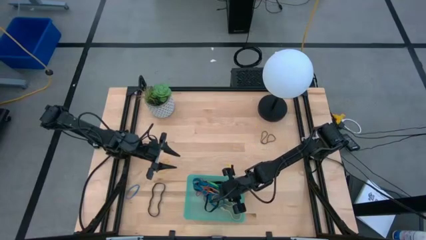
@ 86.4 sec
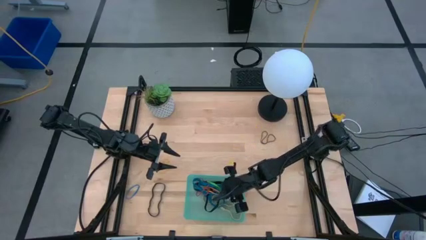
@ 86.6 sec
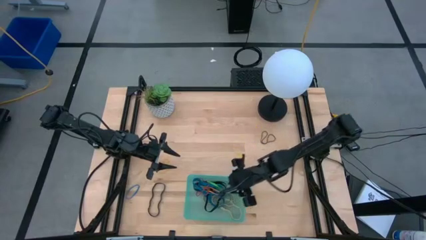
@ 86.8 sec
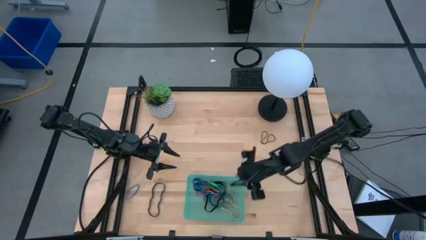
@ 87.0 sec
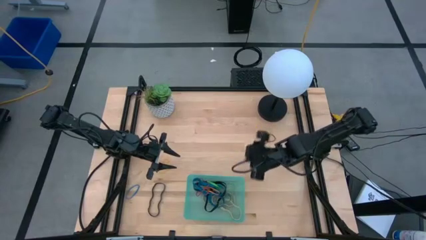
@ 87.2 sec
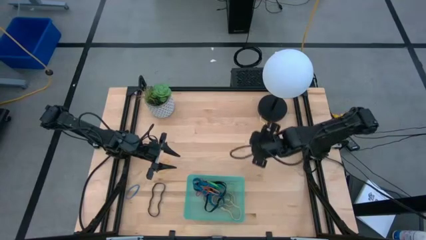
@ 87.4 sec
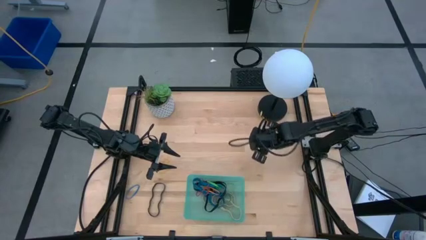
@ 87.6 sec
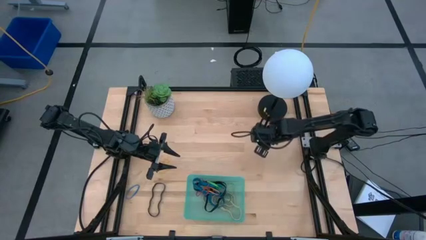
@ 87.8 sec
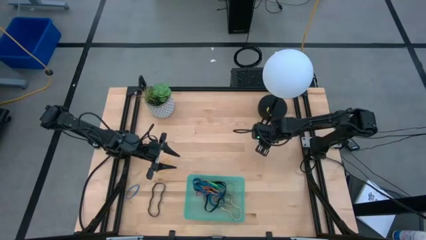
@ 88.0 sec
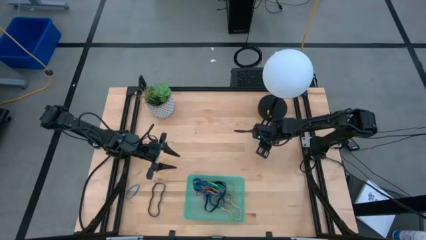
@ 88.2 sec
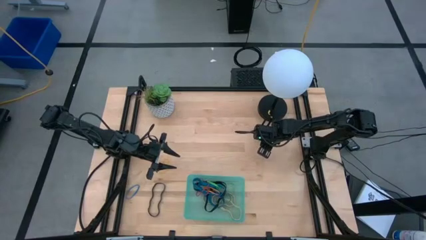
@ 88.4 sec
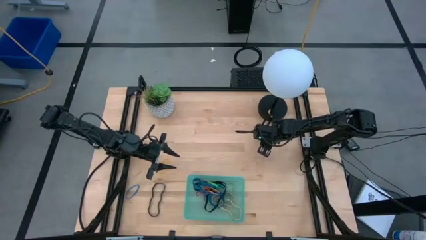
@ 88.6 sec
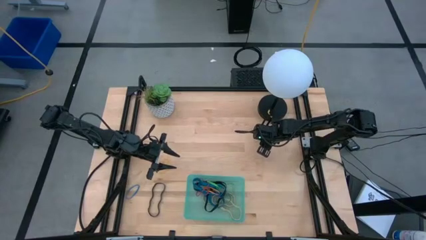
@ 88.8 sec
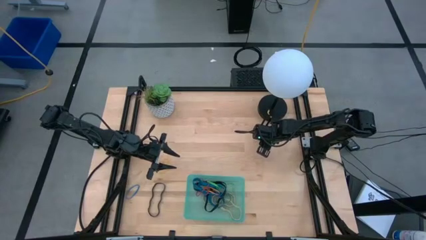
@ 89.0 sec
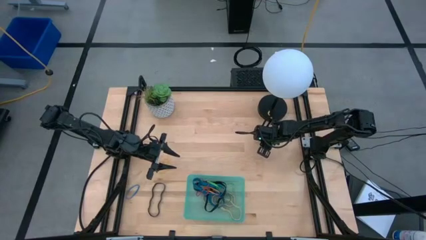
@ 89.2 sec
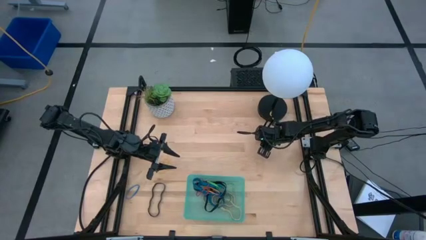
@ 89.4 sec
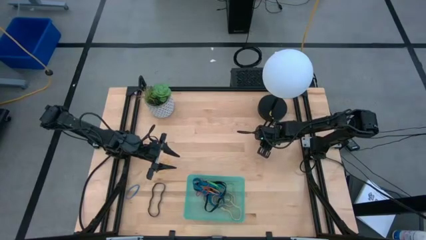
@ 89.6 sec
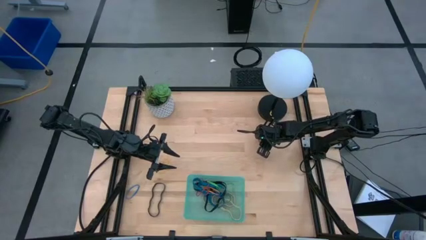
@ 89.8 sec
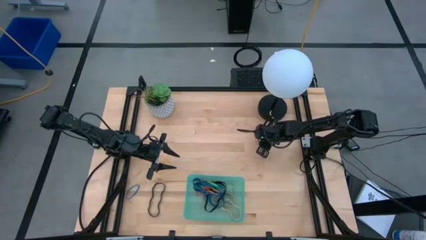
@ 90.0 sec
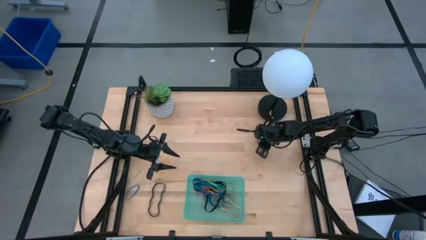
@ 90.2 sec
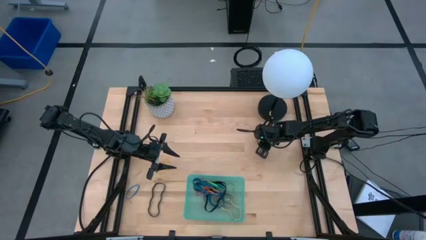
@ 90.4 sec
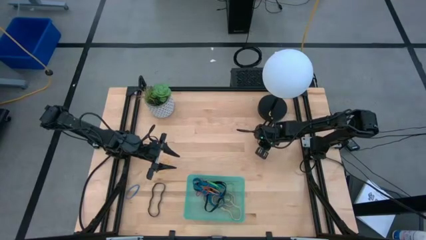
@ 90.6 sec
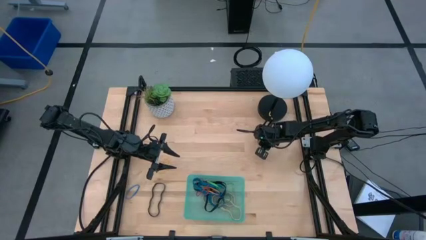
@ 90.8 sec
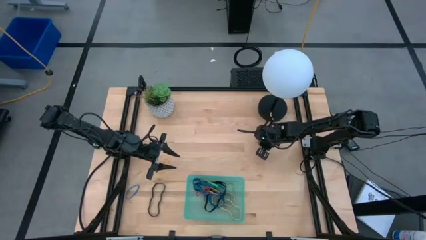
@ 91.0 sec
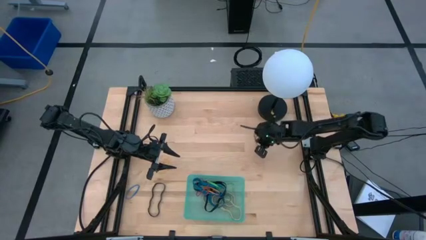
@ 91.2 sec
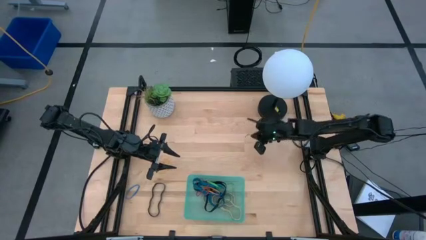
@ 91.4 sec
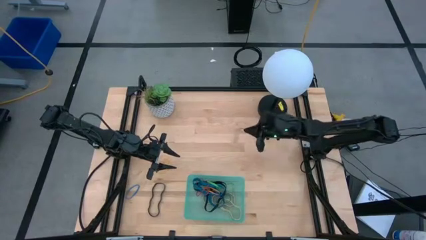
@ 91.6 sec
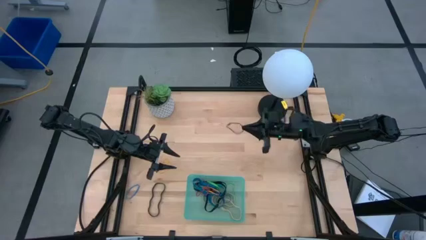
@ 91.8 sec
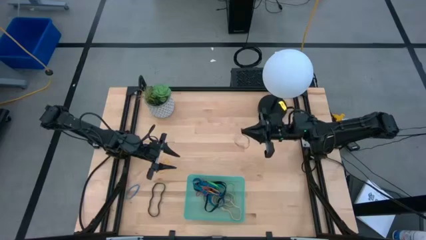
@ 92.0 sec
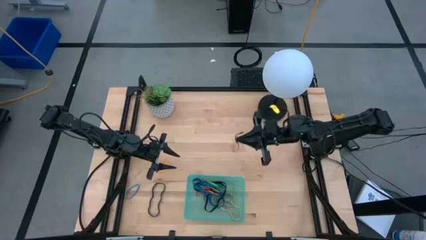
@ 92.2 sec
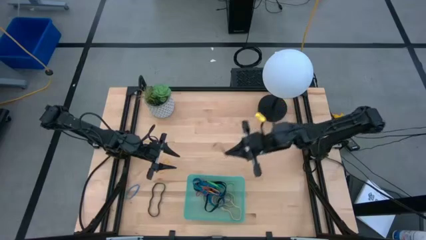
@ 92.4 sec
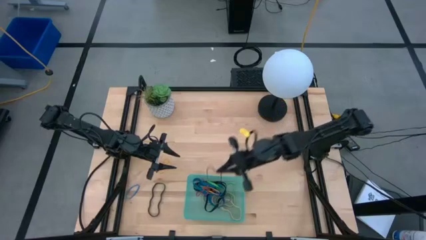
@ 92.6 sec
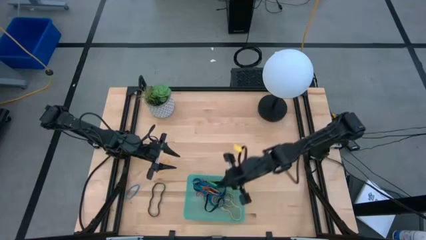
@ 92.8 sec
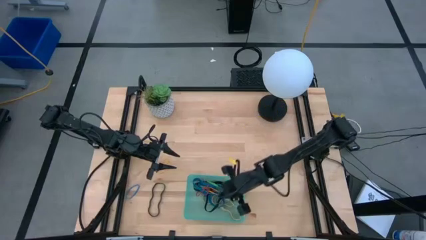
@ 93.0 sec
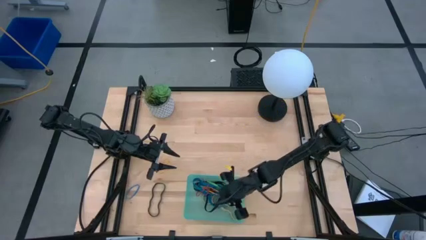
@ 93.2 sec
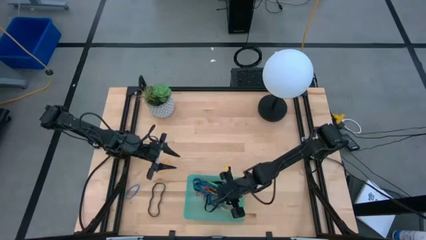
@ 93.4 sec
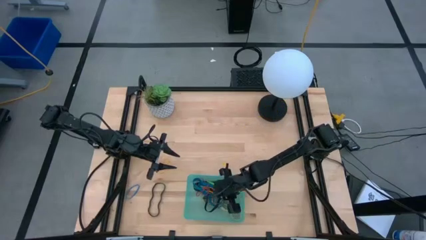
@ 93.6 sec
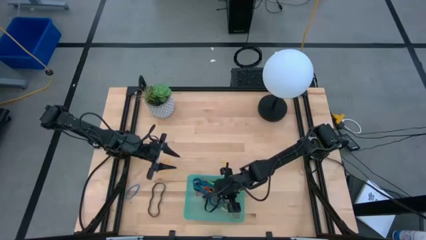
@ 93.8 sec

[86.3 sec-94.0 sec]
Task: Pick and place rubber bands into bin
Put the small violet rubberband into the green bin

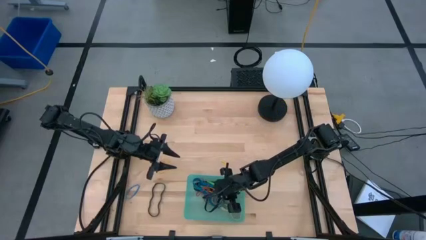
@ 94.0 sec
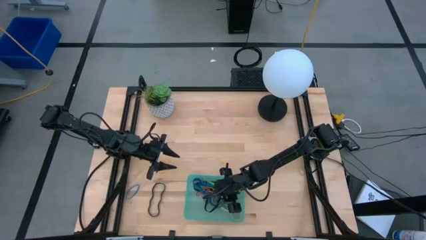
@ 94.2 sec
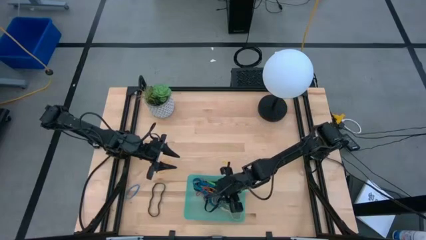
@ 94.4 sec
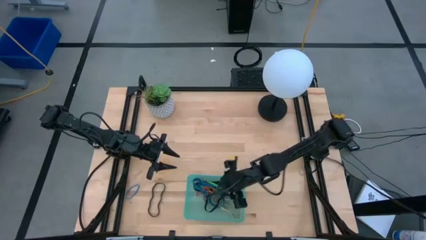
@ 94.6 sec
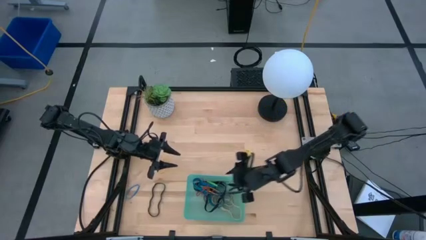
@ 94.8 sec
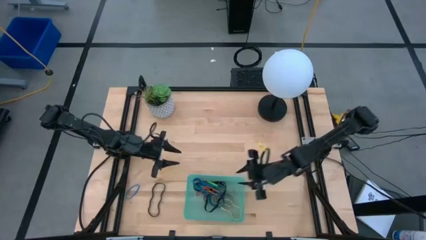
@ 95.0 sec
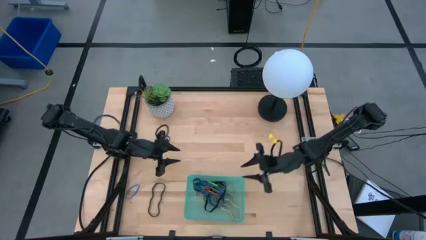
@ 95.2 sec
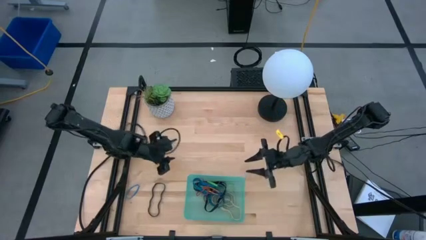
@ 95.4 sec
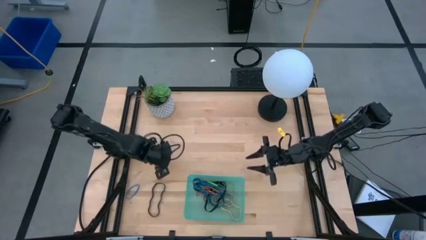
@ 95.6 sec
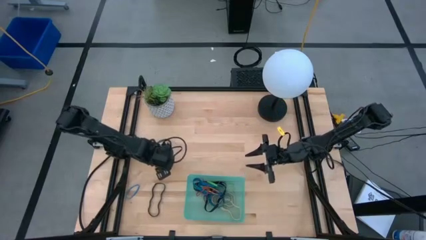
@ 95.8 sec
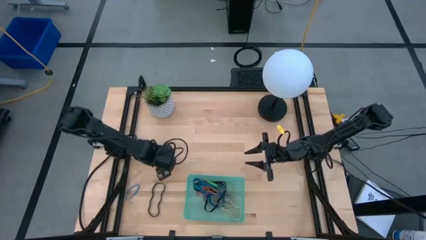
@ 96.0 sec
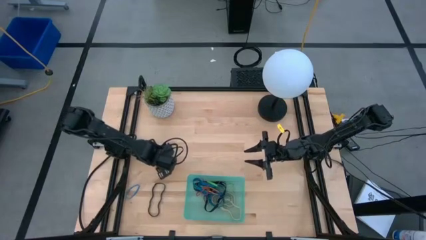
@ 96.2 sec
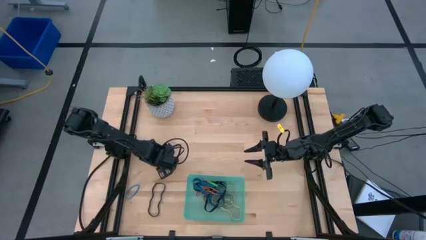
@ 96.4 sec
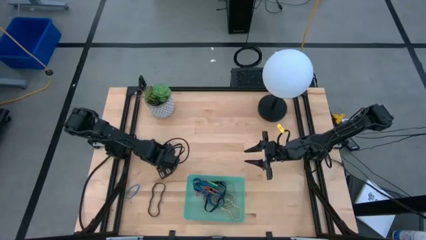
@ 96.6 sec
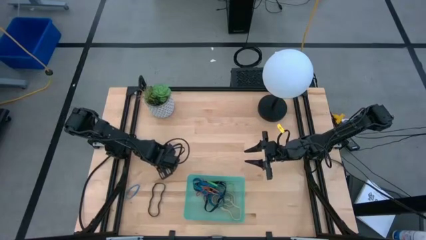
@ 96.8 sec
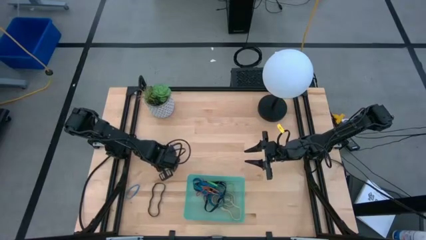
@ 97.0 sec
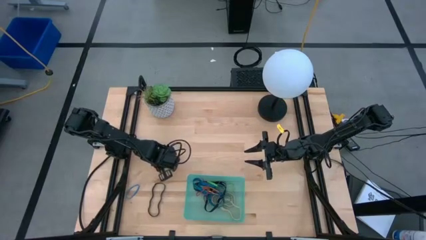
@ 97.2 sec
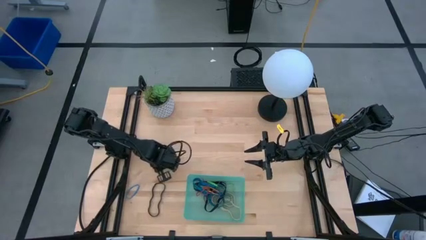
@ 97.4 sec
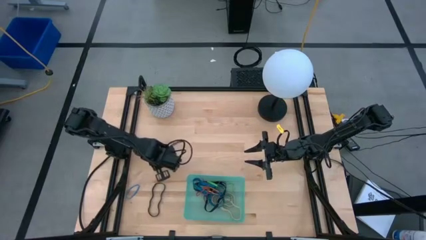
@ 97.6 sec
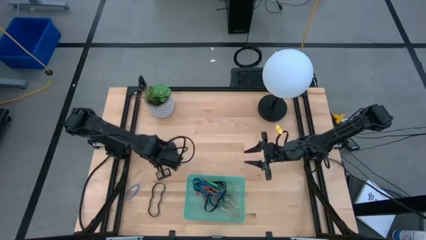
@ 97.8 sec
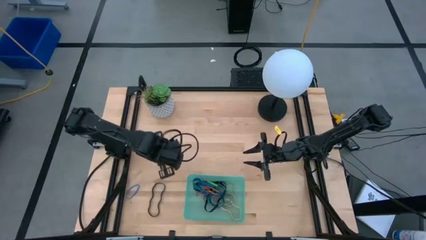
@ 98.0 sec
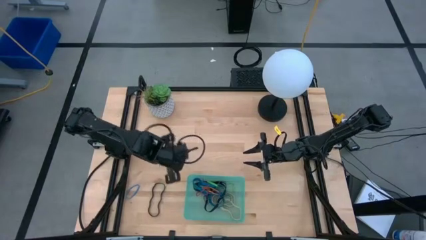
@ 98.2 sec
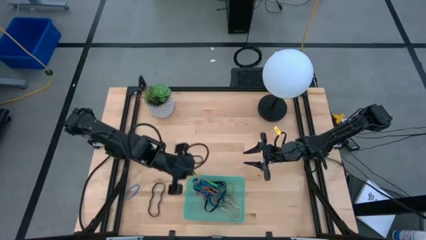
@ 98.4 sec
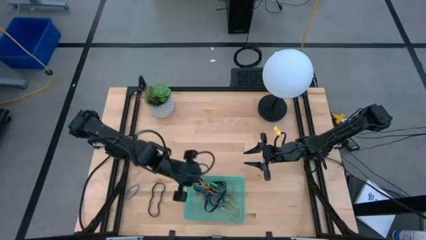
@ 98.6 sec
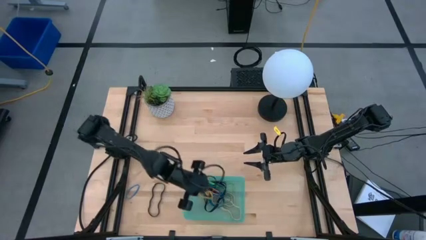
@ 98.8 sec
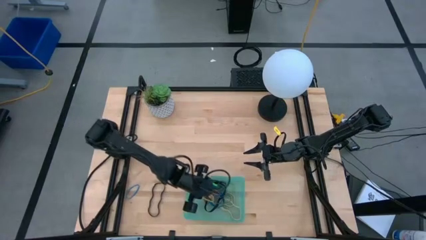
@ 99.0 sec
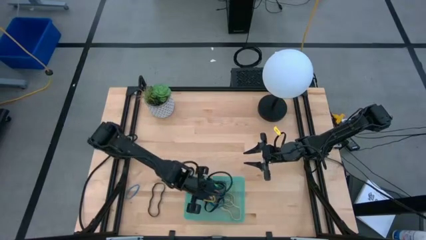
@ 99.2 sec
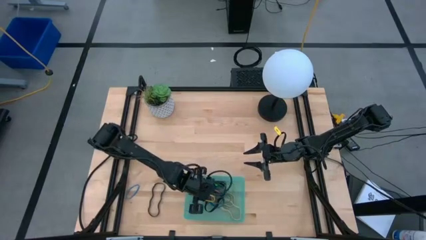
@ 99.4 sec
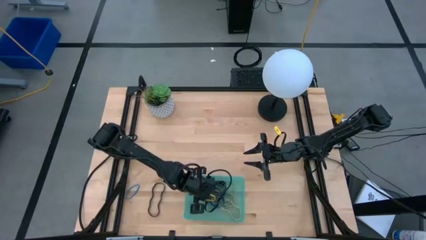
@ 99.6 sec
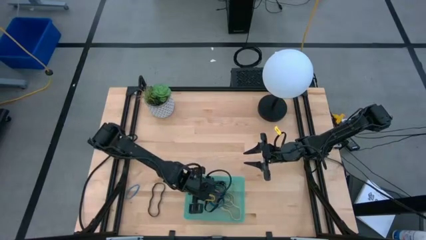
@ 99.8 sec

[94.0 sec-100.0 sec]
Put the small yellow rubberband into the green bin

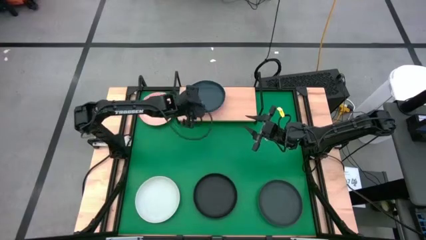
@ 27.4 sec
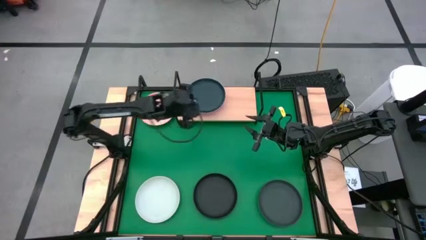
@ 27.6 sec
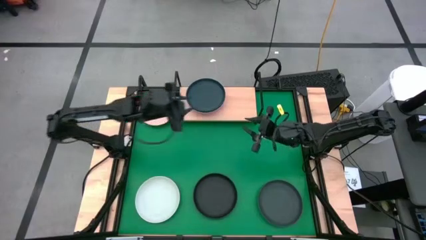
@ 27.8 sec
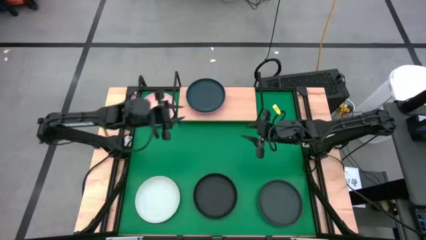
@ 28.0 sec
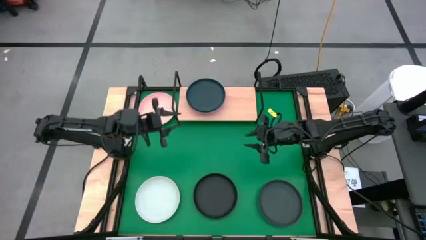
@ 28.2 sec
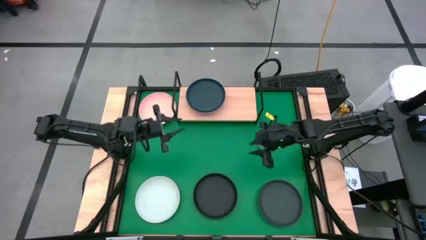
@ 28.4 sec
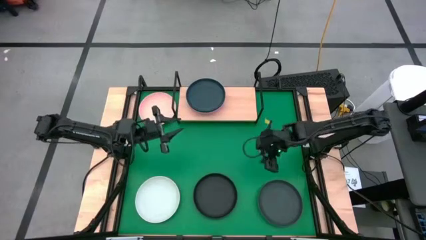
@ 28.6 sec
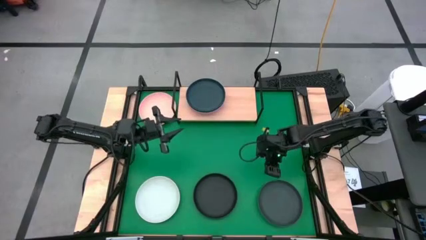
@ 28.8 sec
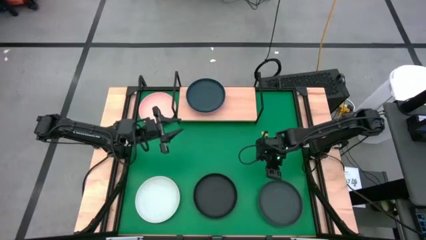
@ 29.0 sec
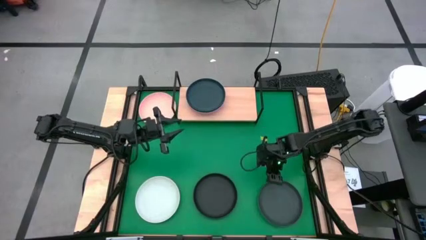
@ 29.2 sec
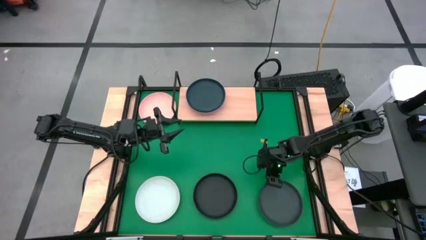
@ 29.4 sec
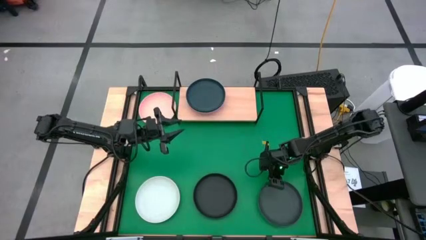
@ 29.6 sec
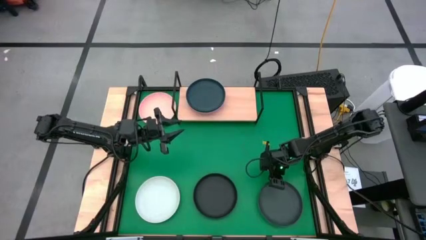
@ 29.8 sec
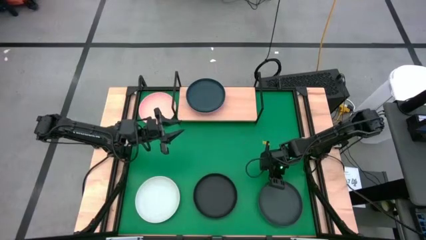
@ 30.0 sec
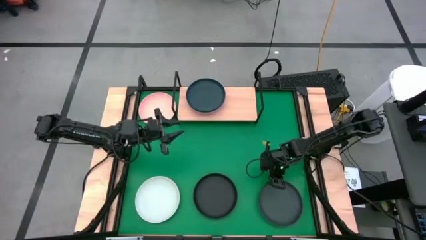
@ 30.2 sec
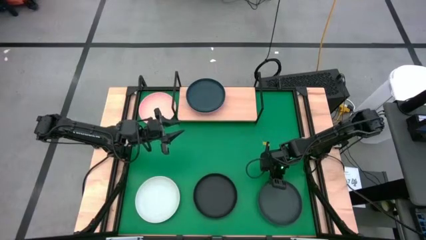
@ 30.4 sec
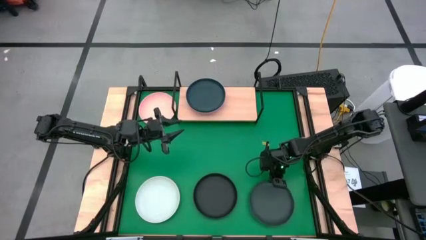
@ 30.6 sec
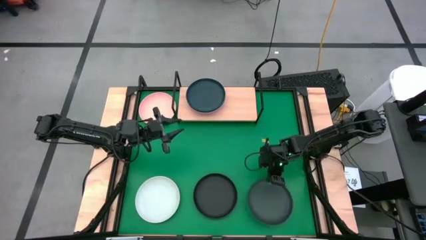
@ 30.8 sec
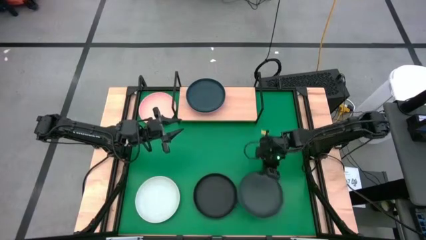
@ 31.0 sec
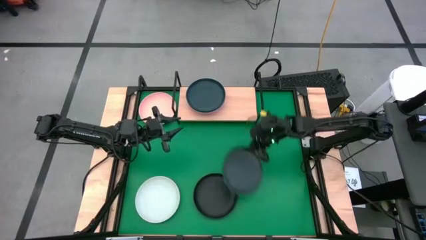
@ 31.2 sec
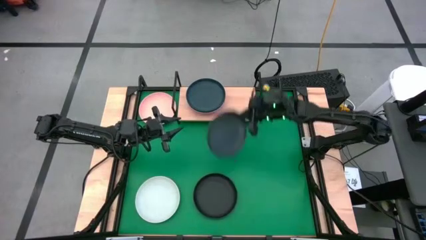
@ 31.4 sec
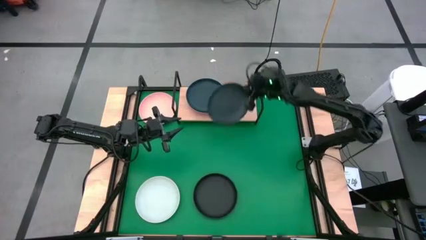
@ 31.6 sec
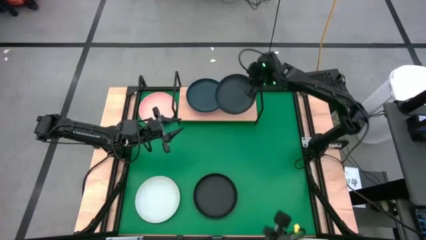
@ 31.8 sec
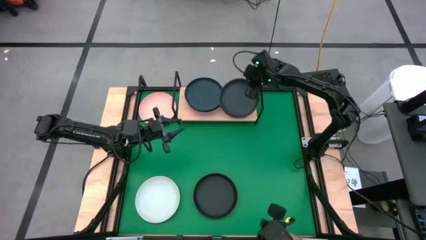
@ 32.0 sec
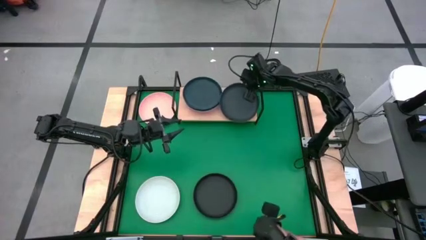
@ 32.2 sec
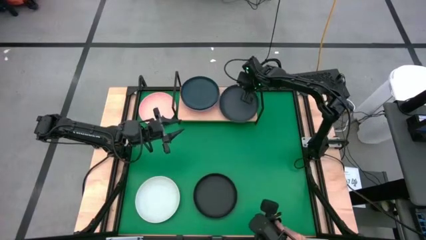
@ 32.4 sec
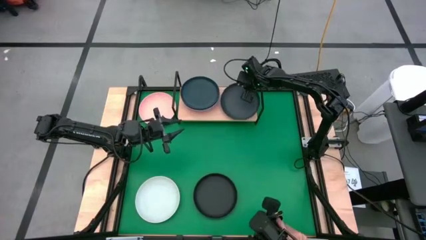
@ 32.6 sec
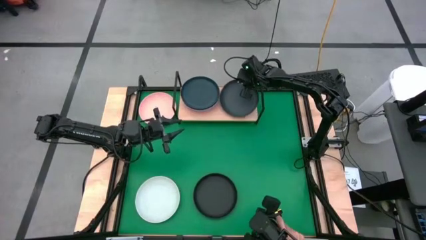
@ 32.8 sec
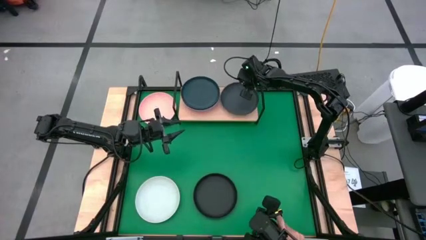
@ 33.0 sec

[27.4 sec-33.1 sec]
Task: Place and stack plates onto a shelf
Put the dark green plate on the shelf
